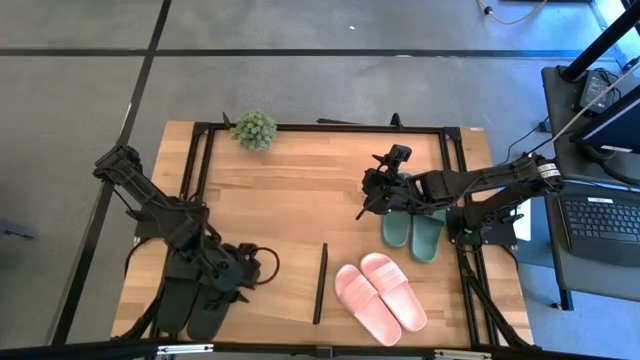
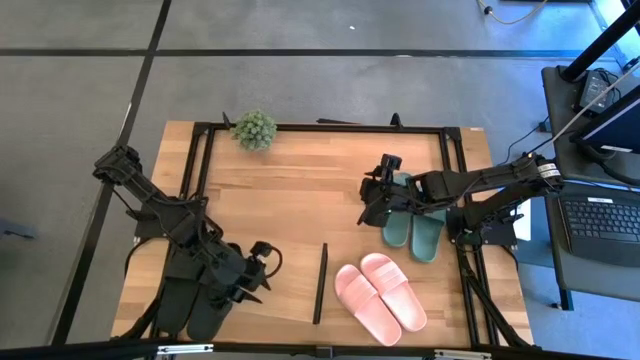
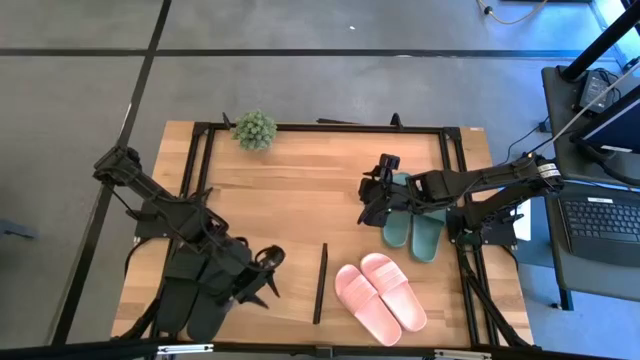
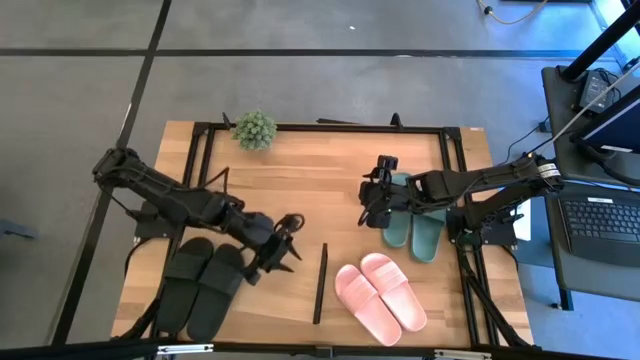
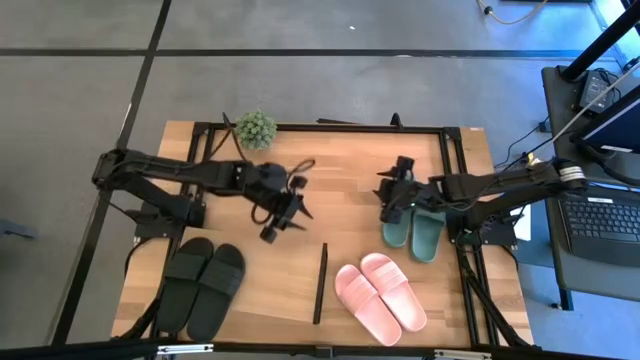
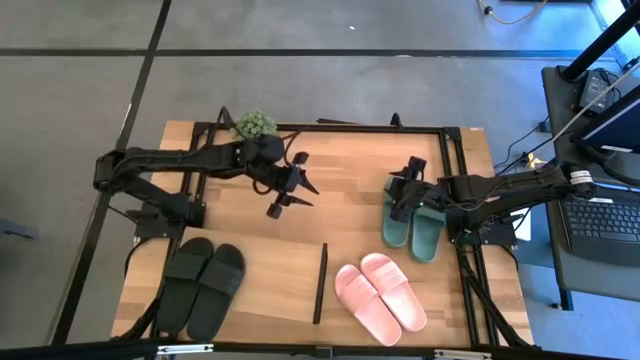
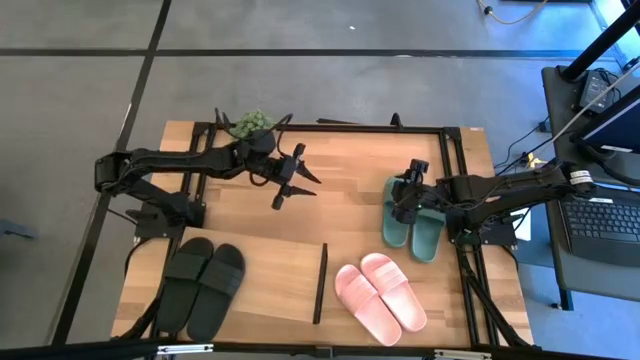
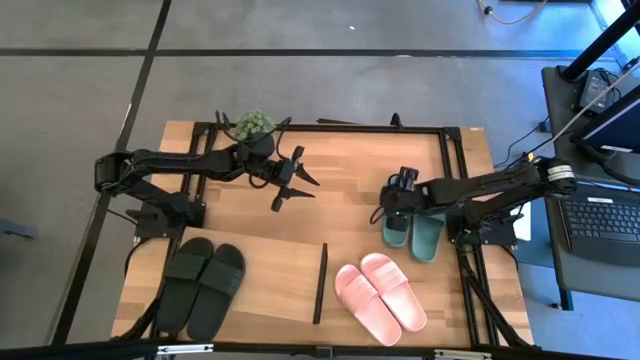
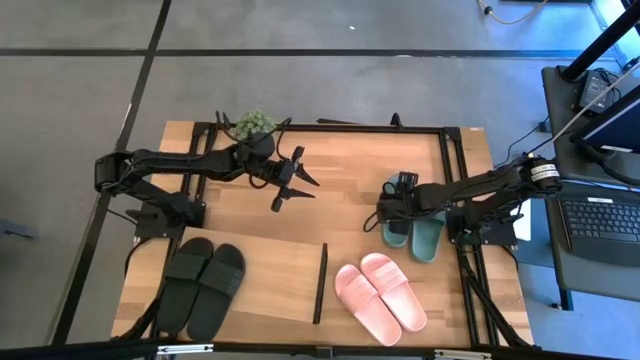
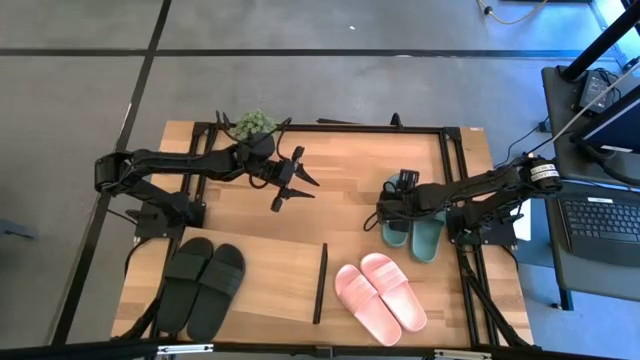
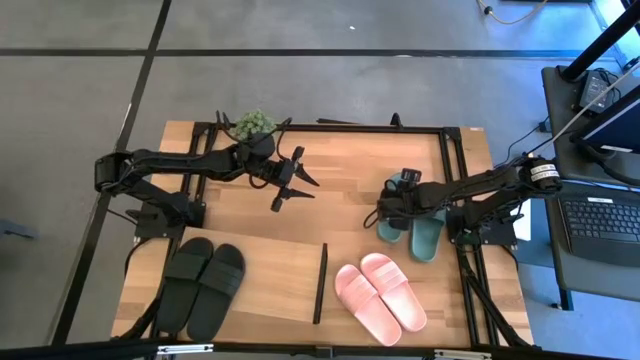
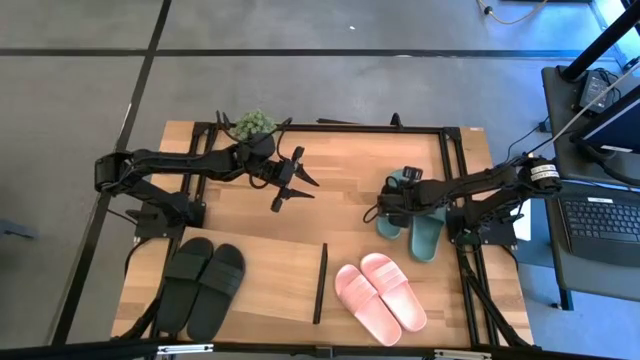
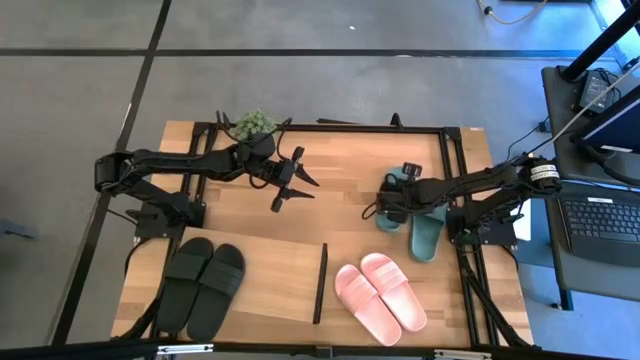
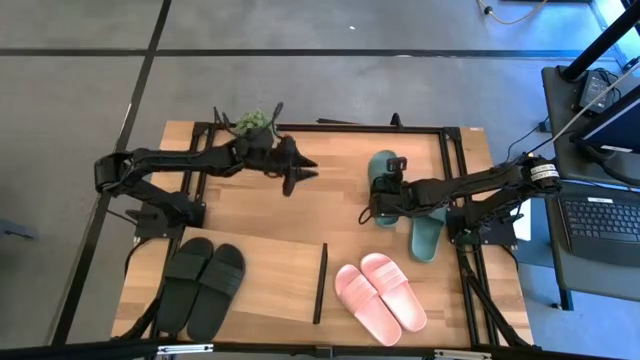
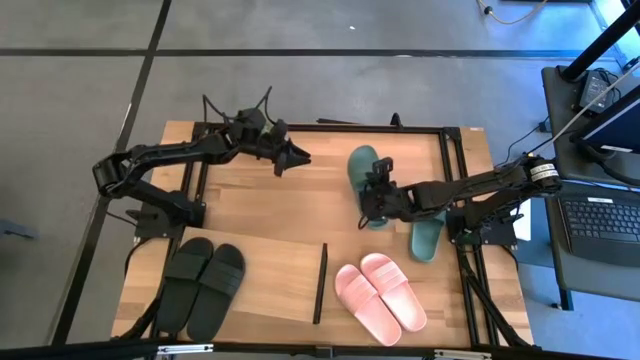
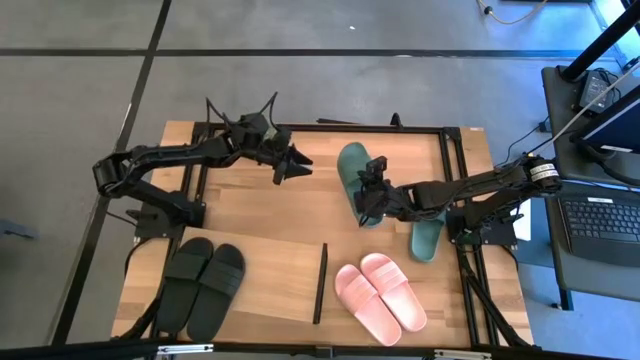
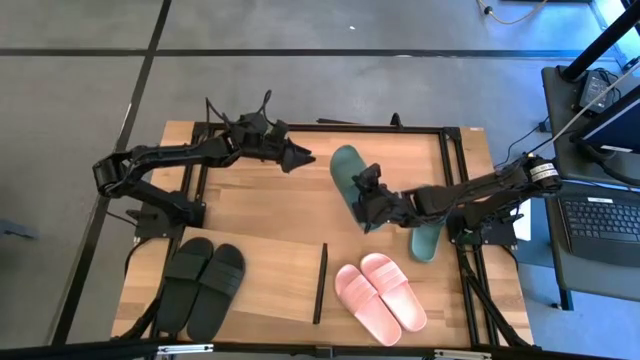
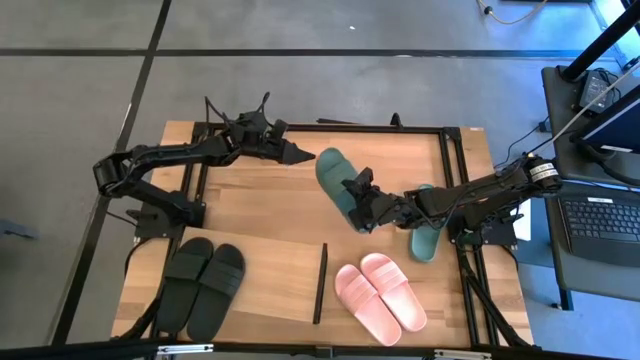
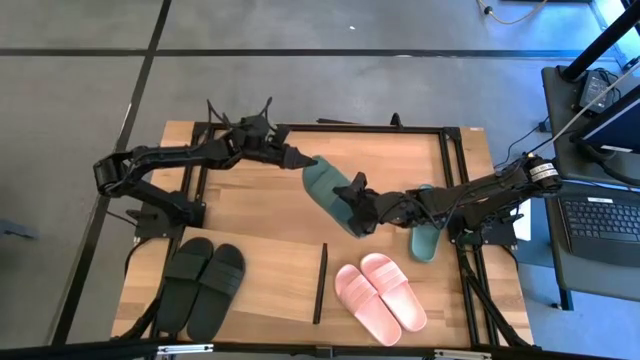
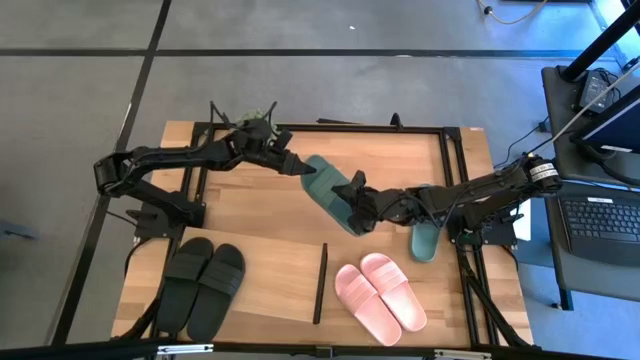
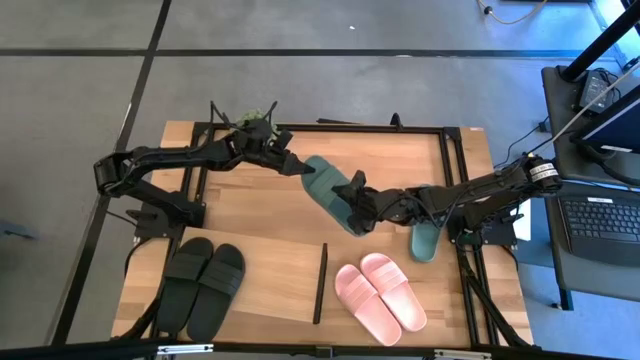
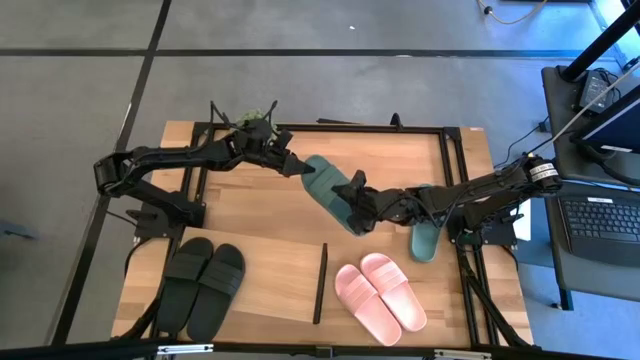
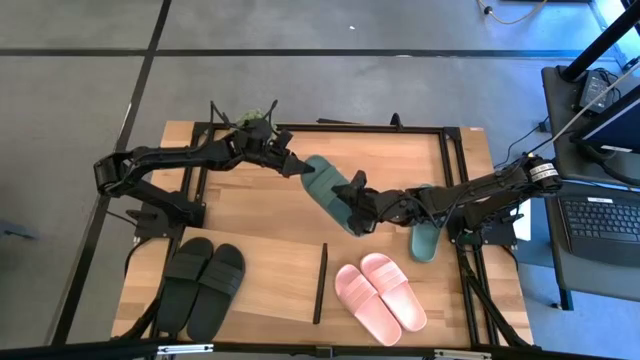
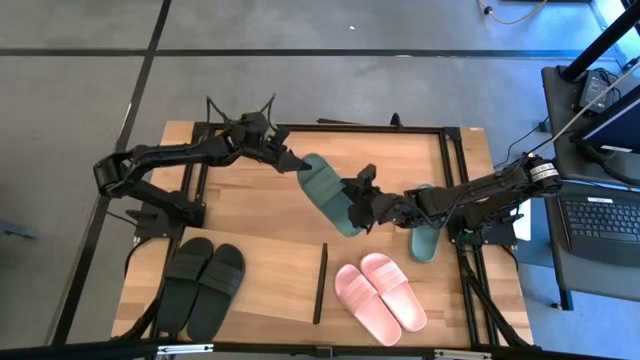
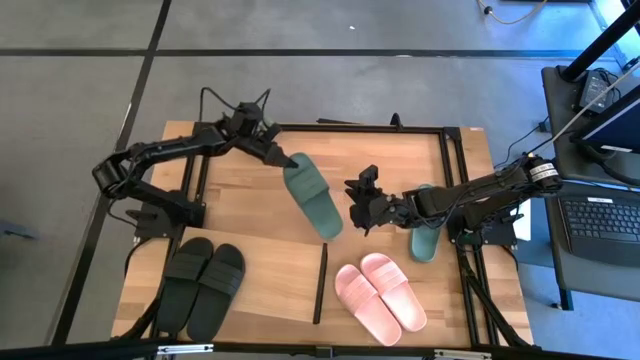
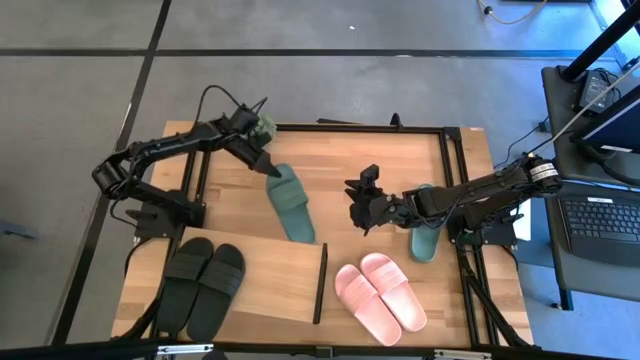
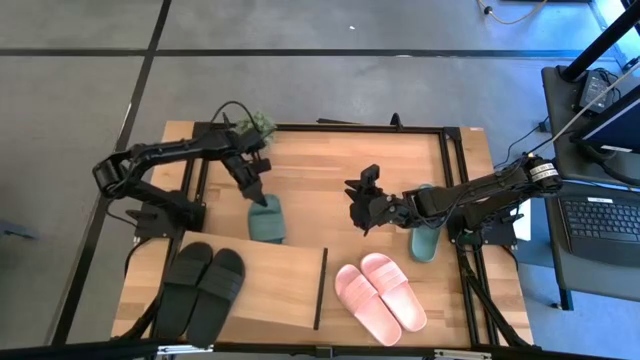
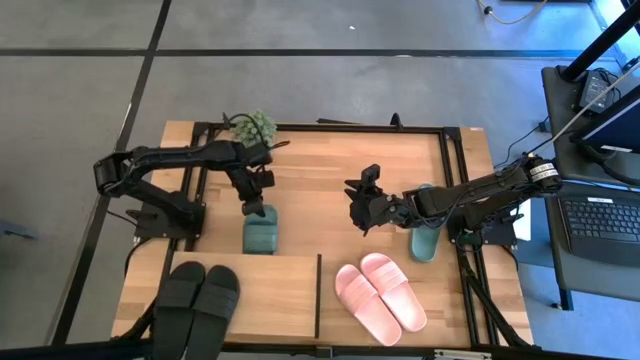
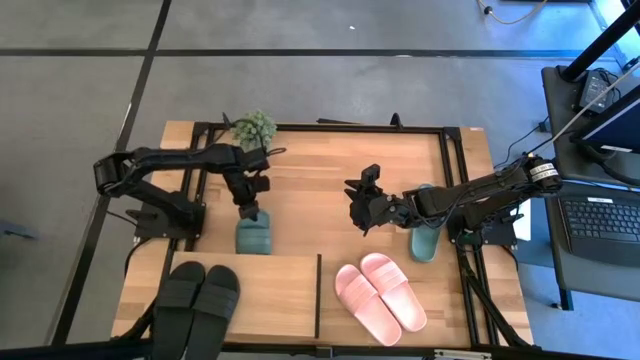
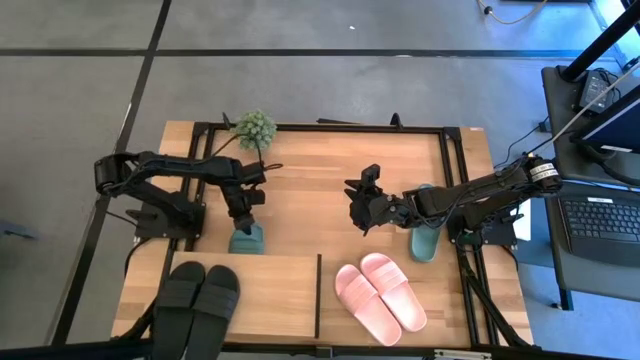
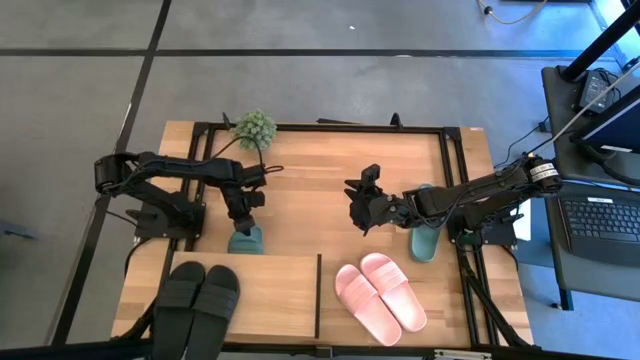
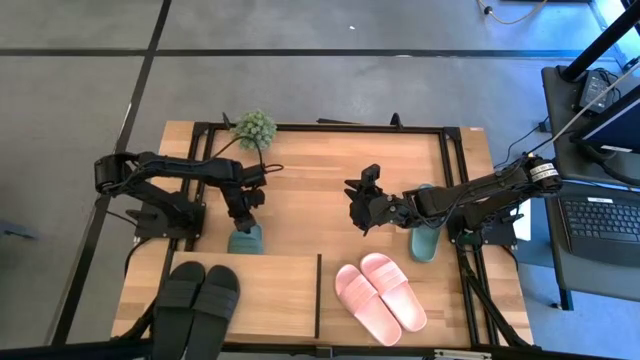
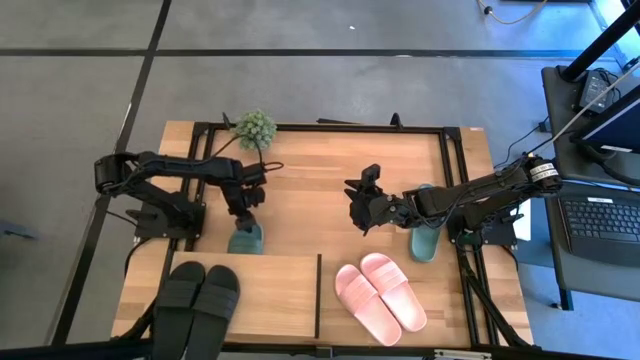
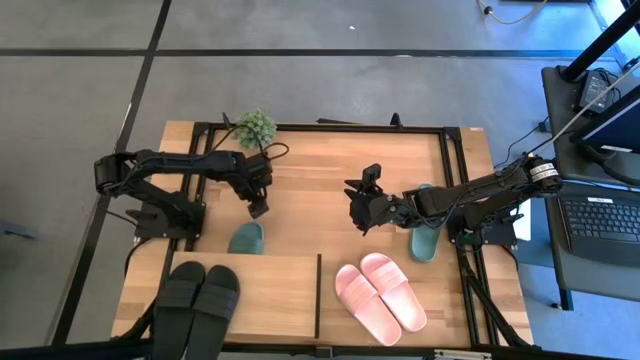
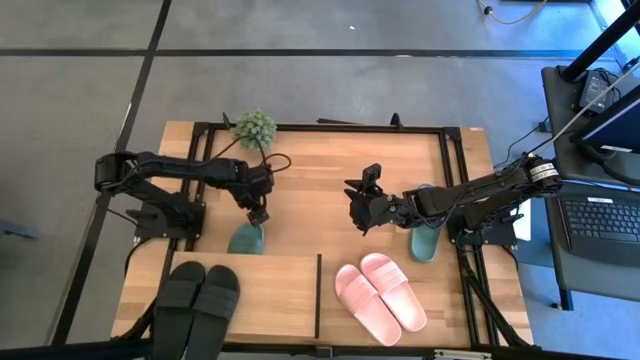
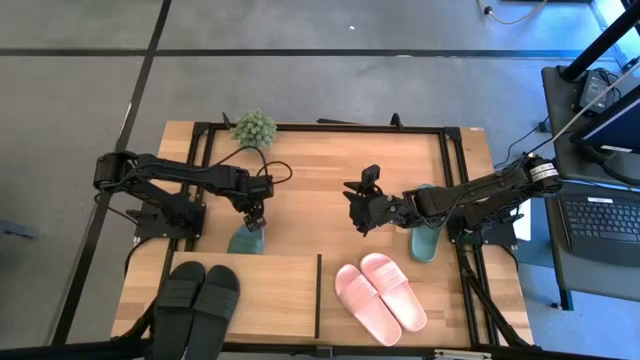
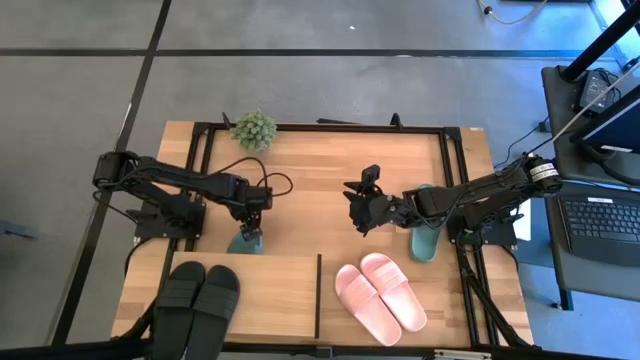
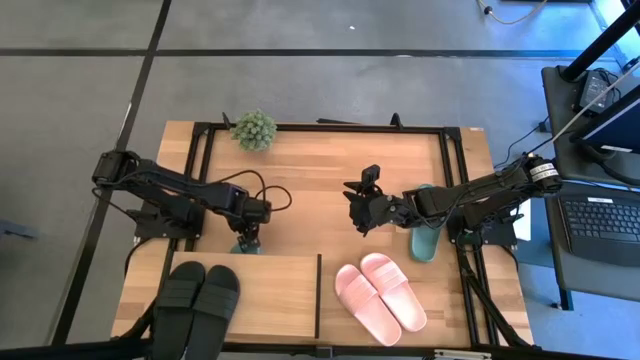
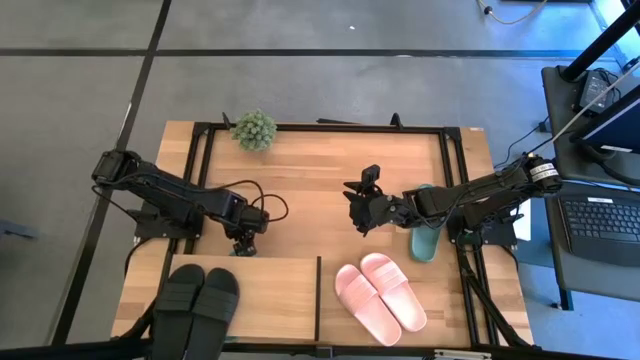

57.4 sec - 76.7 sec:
Task: Pick and place slides into the shelf
Put the left green slipper under the shelf

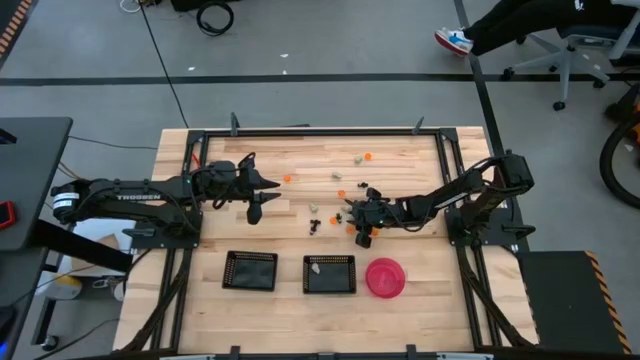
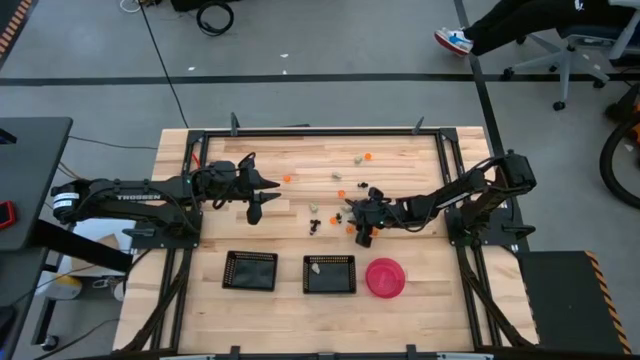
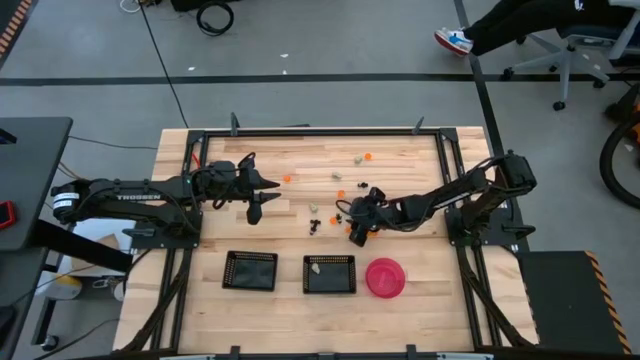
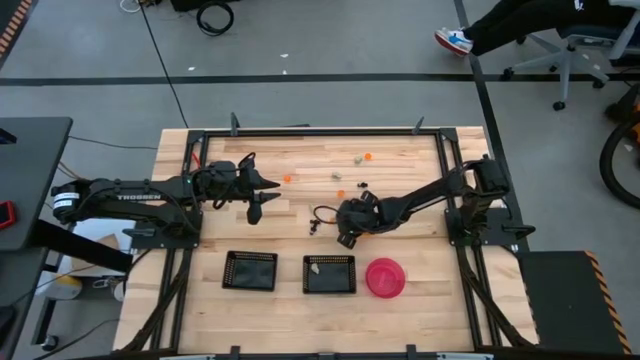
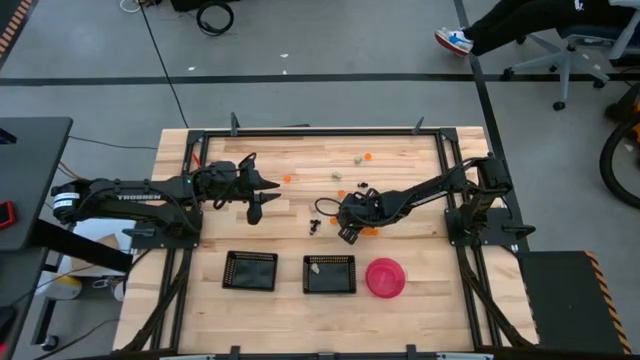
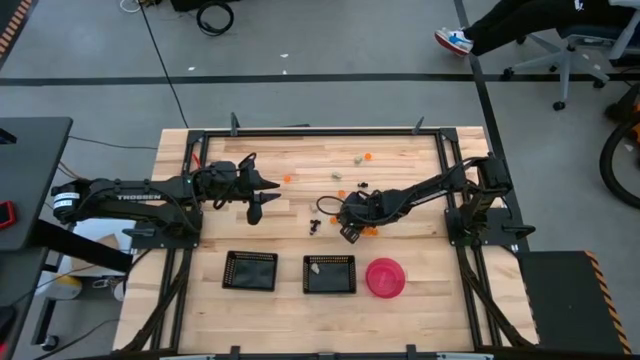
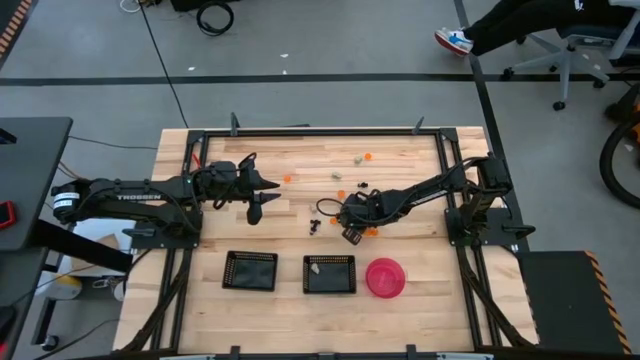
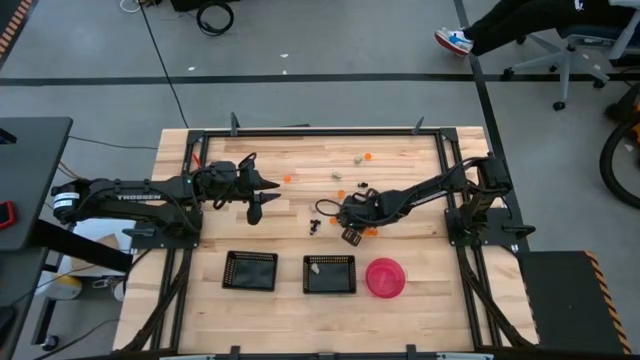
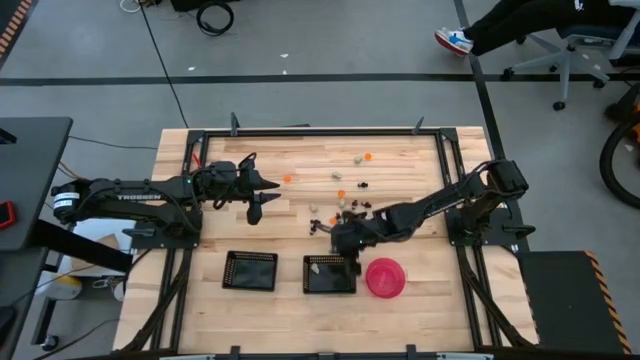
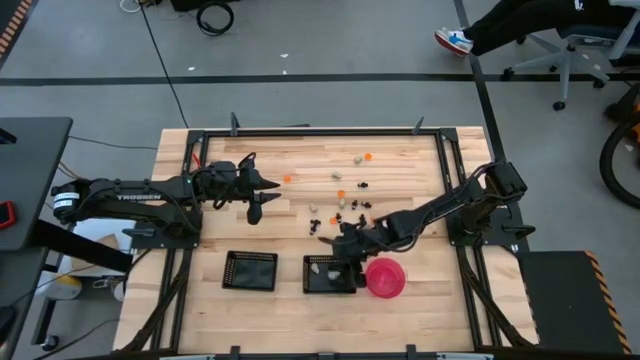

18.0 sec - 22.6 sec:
Task: Sort Halloween decoration
Put the white skull toy into the right black bin
